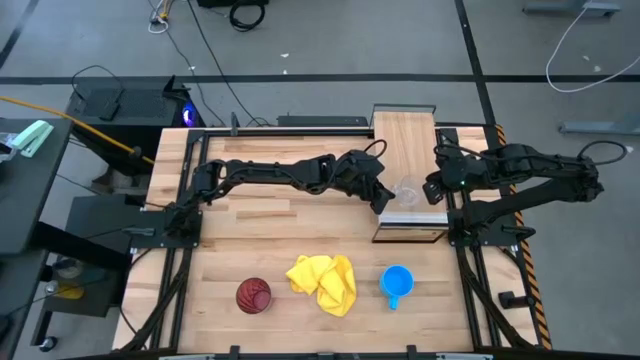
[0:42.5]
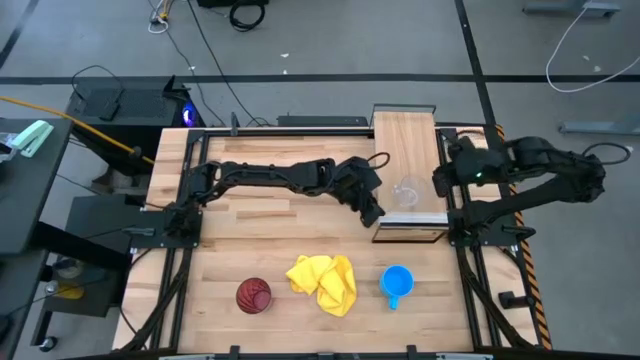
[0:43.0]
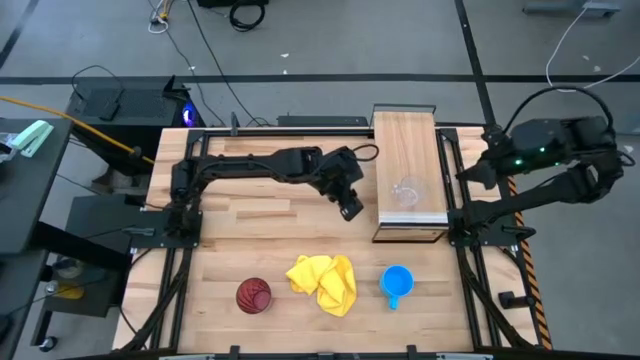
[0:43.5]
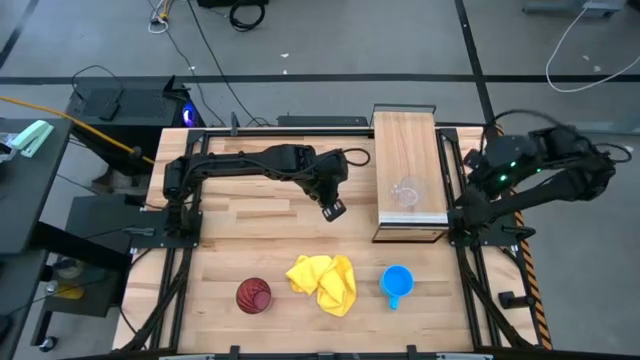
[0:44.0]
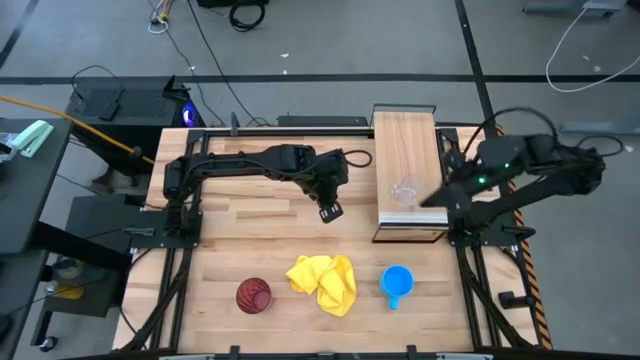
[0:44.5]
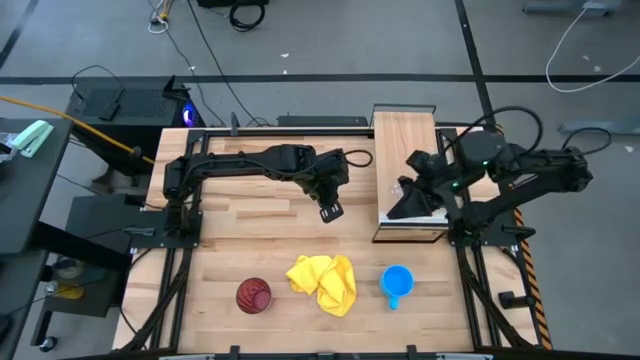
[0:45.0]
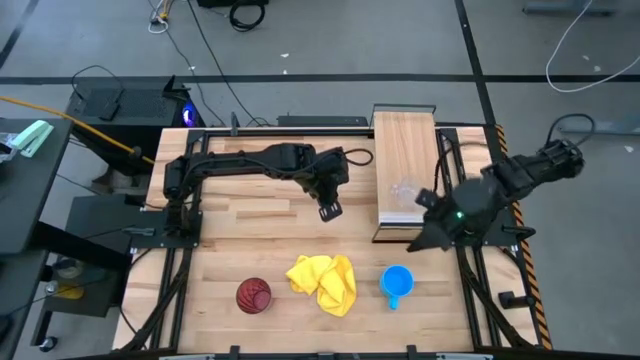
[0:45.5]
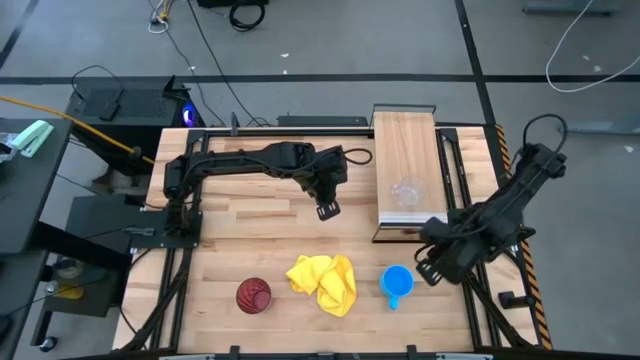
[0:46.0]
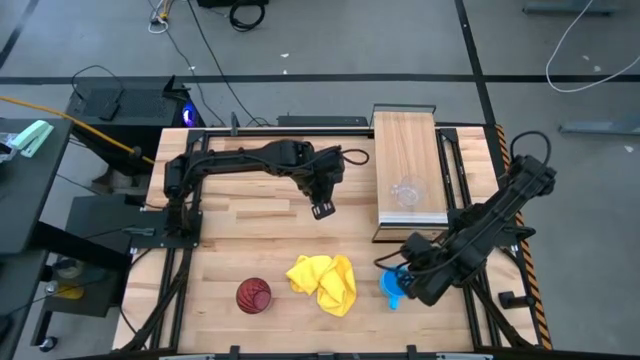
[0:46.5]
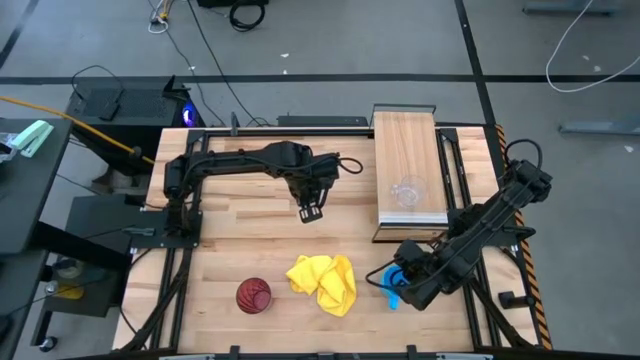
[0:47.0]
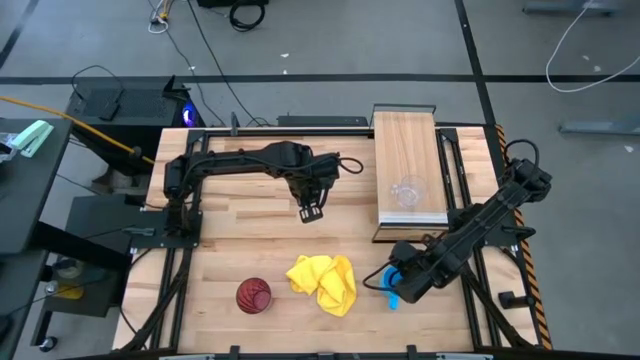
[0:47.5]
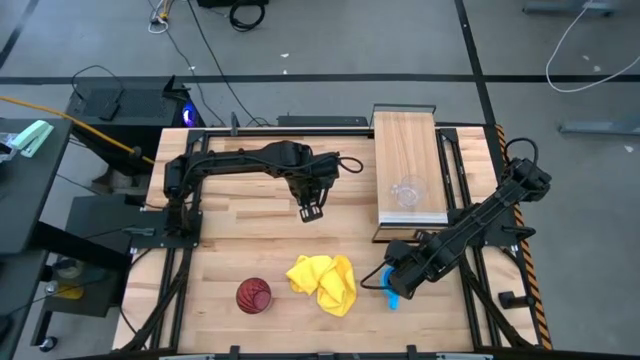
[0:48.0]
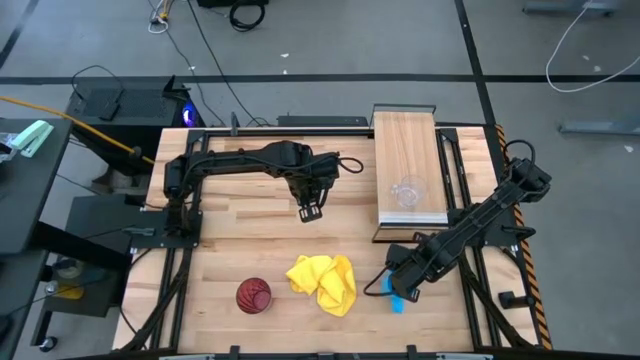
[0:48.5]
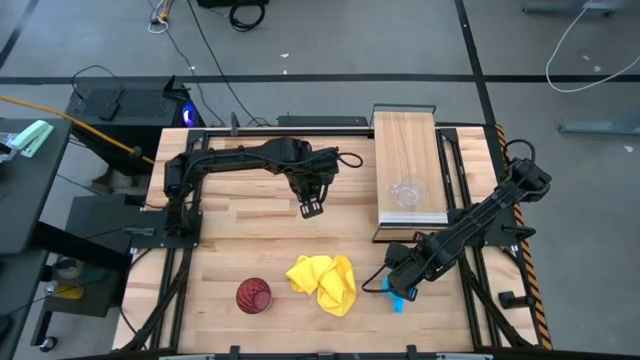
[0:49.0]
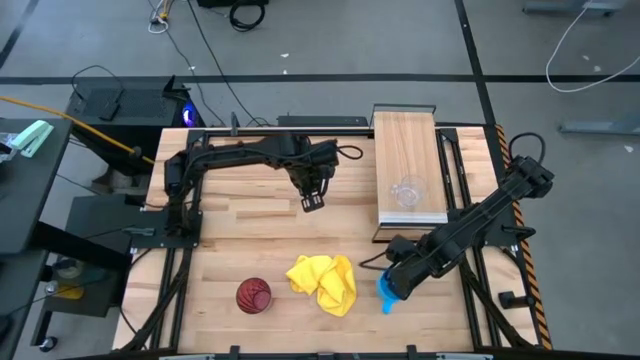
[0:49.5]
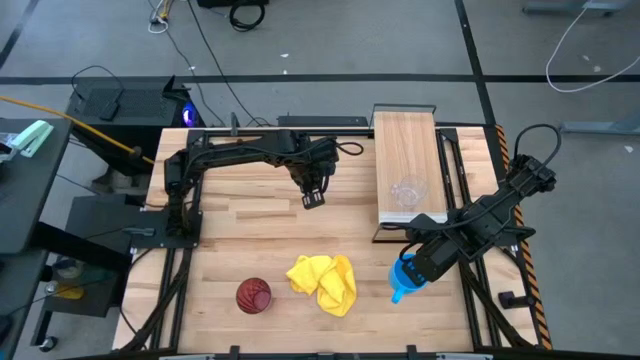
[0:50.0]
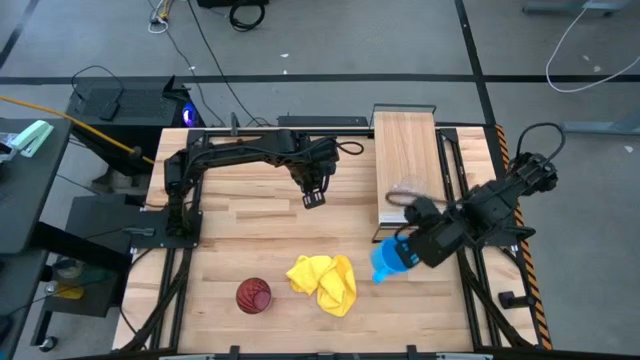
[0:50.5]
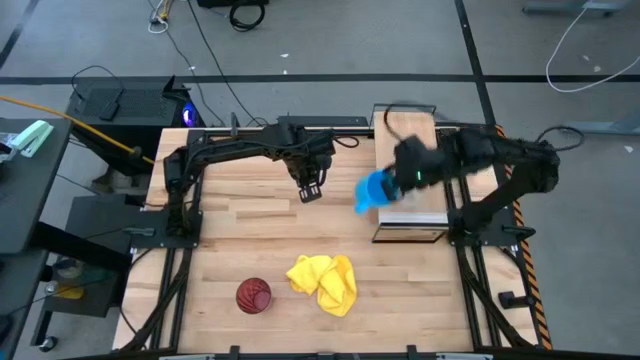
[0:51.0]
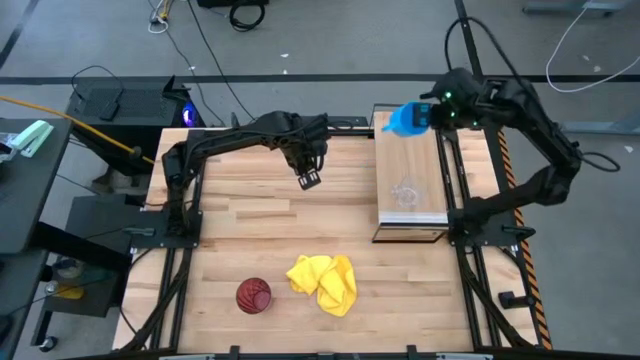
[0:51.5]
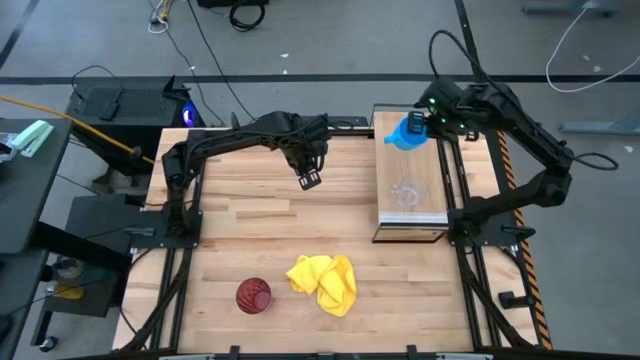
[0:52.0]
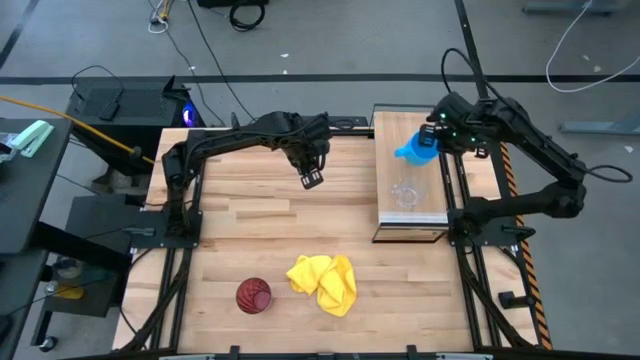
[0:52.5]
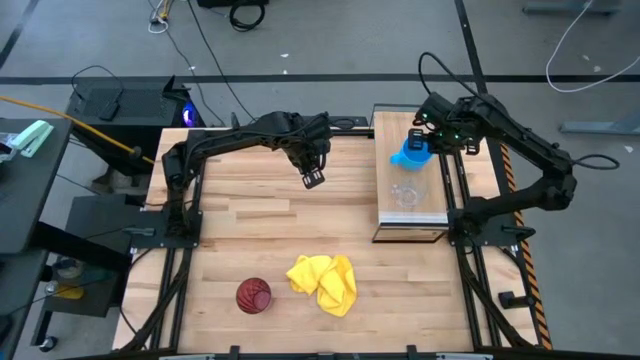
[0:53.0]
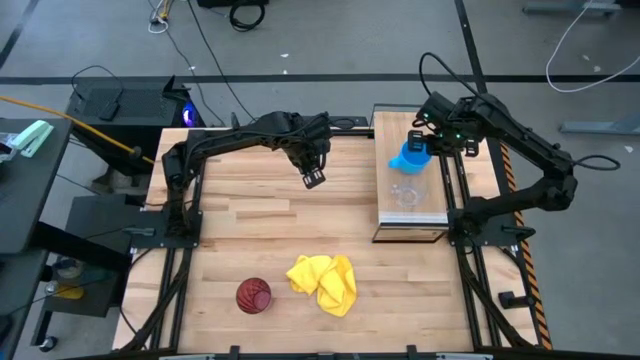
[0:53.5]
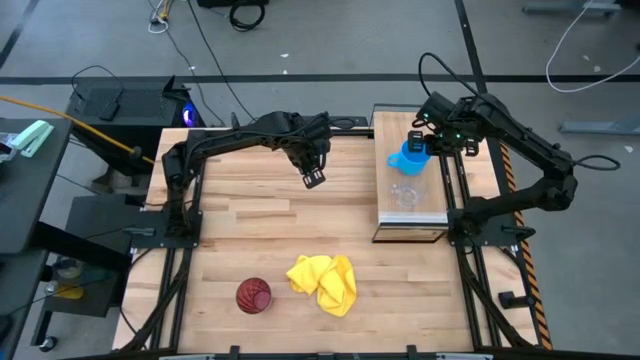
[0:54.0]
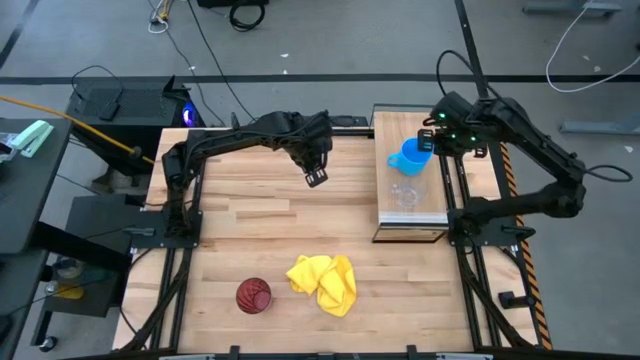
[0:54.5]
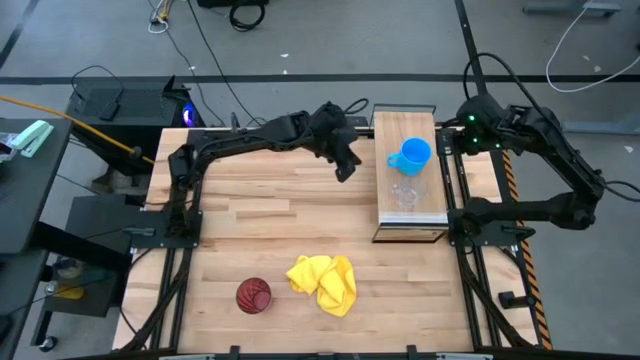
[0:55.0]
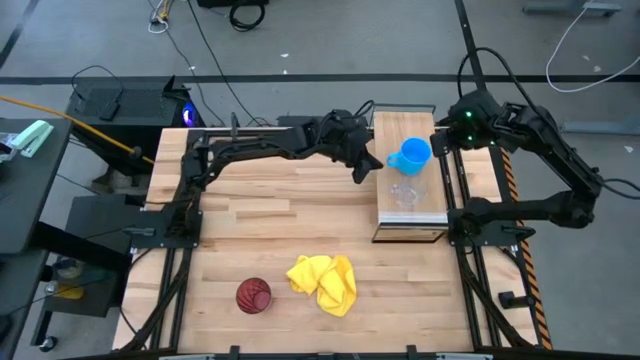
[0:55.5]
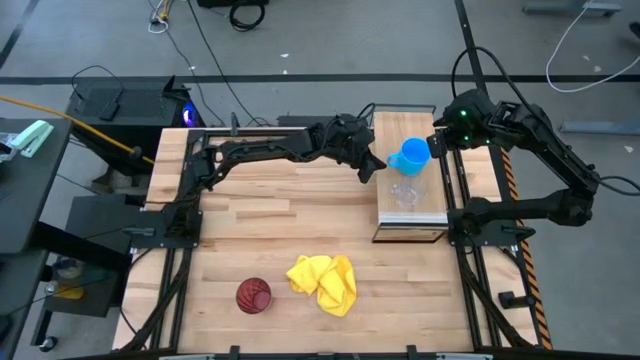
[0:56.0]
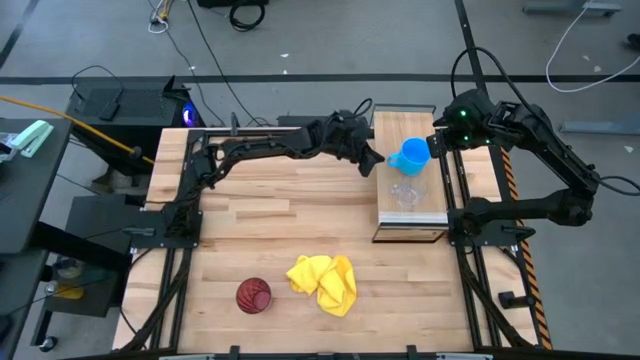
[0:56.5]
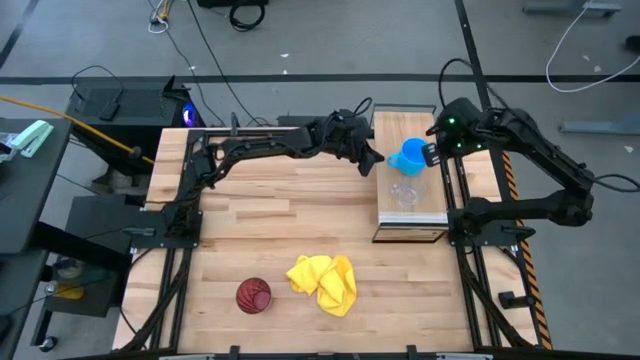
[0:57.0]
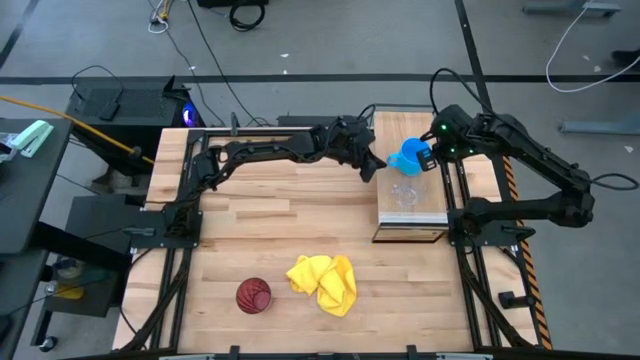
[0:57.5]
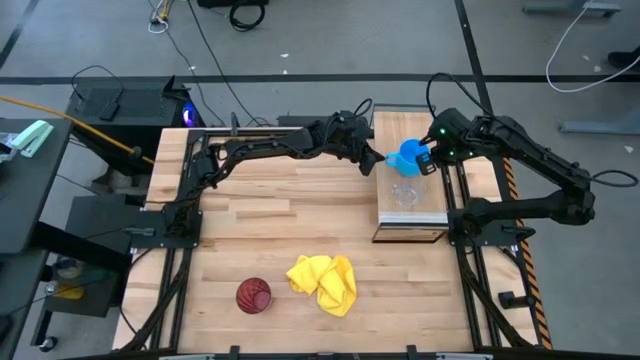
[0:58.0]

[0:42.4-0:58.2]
Task: Stack small to large cups/mugs on shelf
Put the blue mug on the shelf

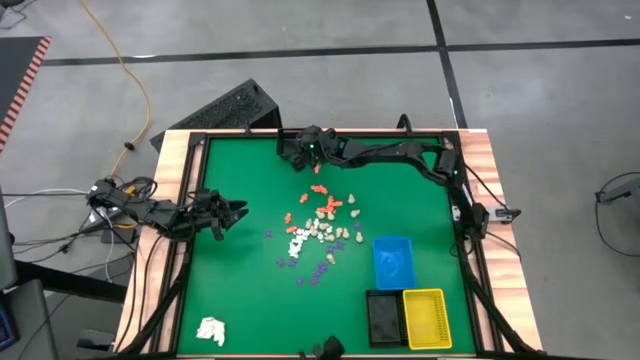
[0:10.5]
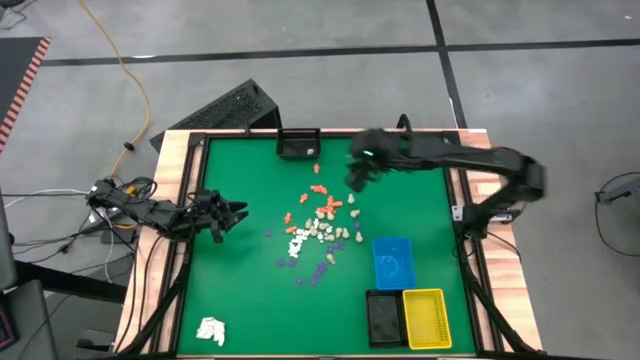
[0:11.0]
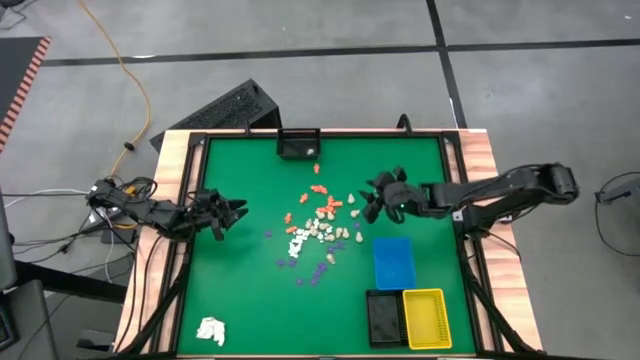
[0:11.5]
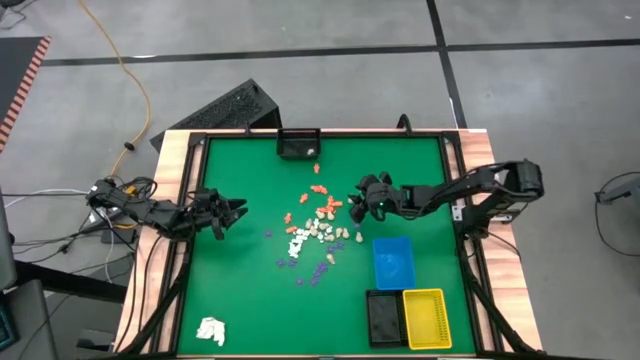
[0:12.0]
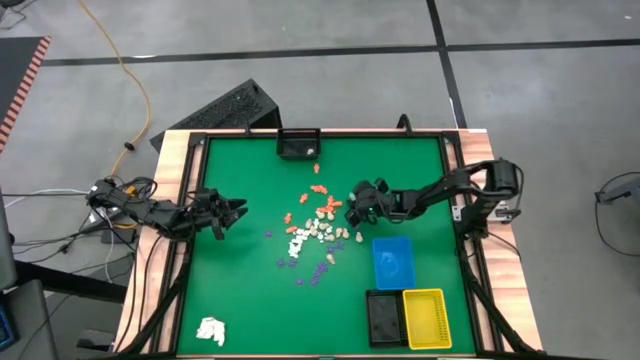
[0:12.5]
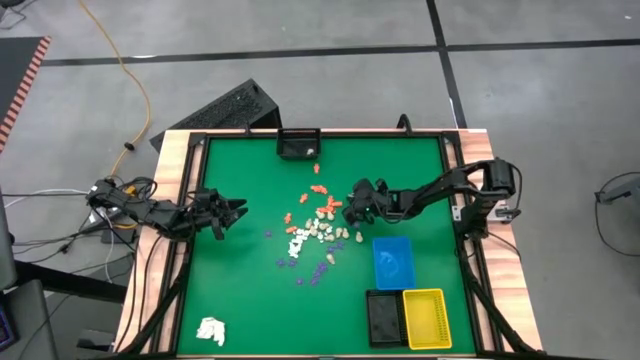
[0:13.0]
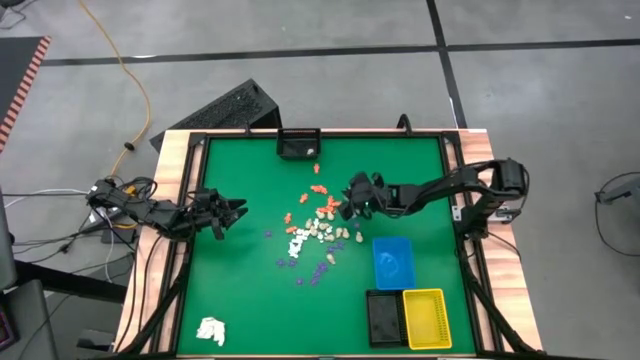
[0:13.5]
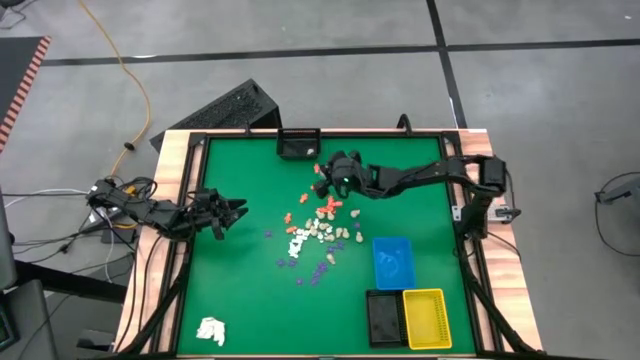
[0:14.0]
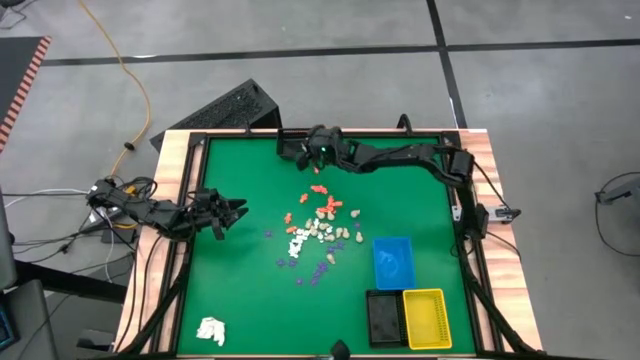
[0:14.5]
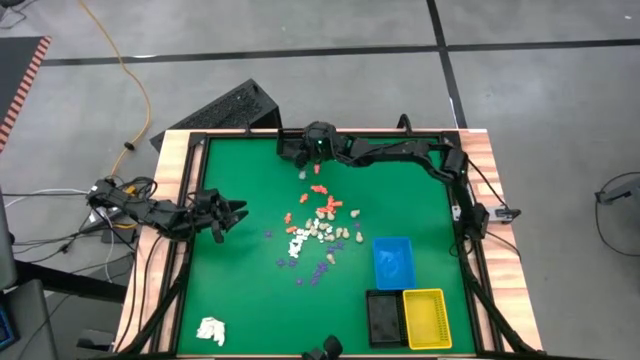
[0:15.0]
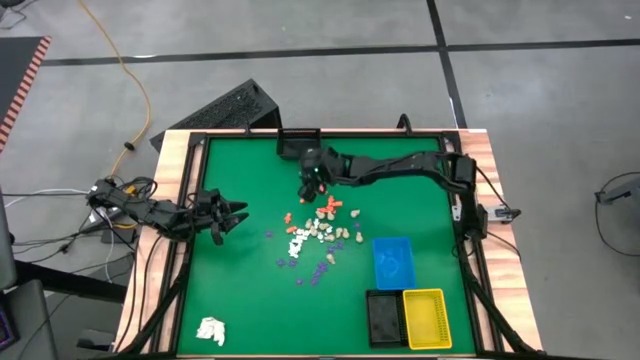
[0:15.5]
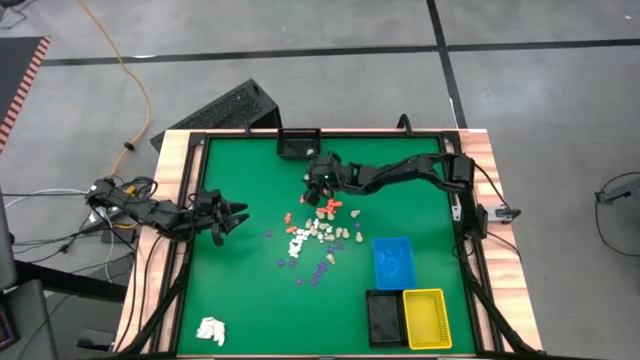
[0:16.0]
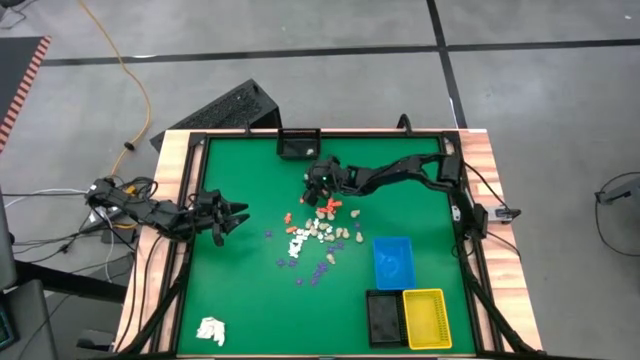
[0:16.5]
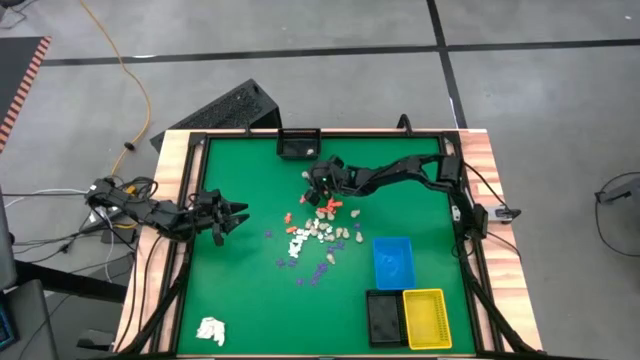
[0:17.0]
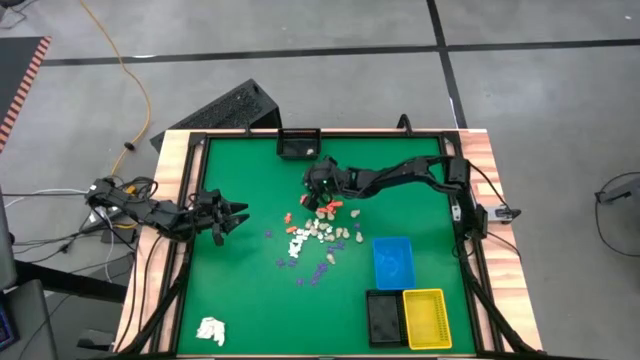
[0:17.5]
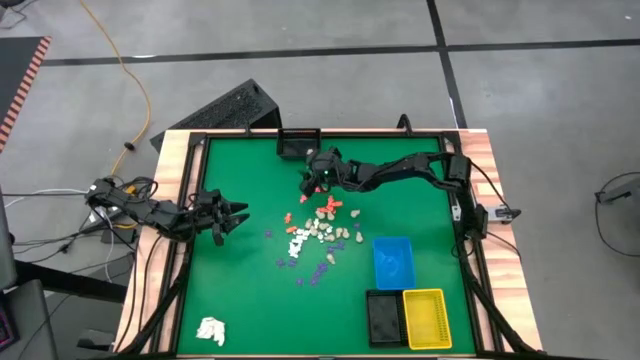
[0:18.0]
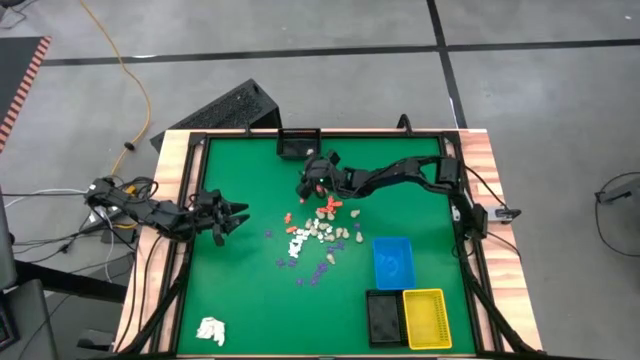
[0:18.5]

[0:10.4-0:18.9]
Task: Sort Halloween decoration
Put the gray skull toy into the top black bin
